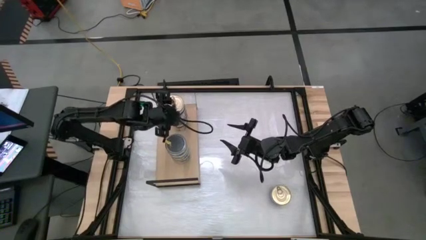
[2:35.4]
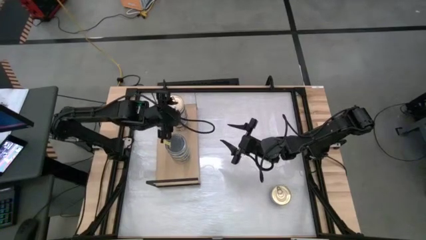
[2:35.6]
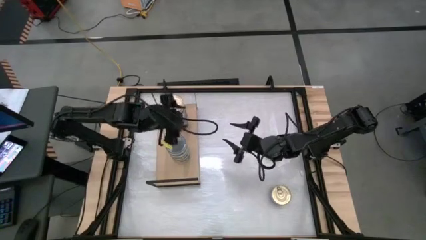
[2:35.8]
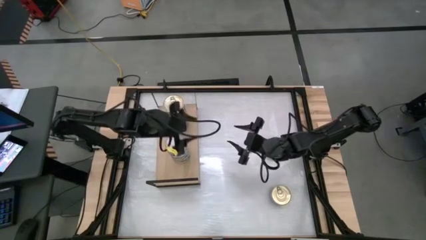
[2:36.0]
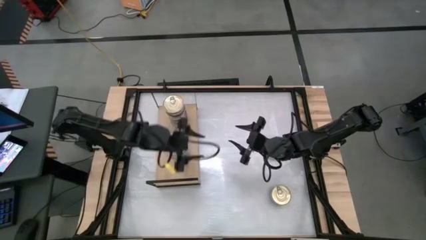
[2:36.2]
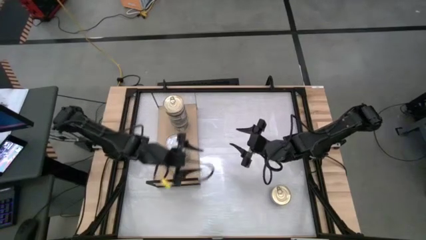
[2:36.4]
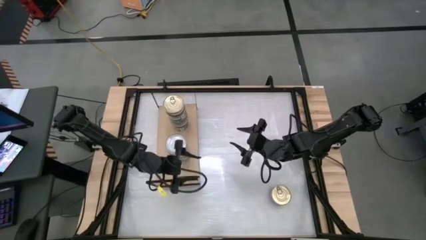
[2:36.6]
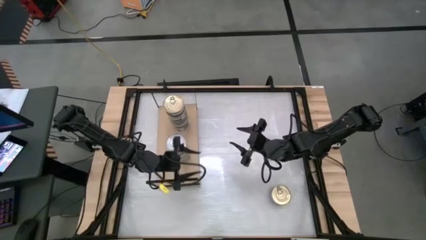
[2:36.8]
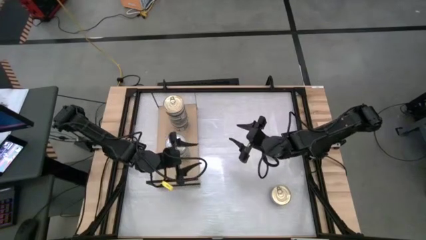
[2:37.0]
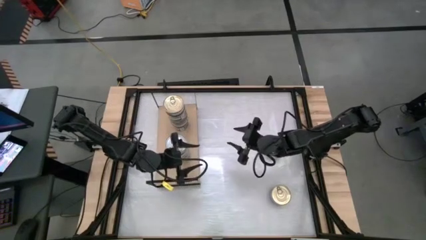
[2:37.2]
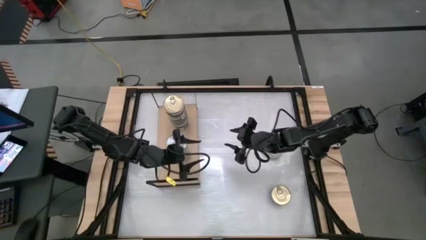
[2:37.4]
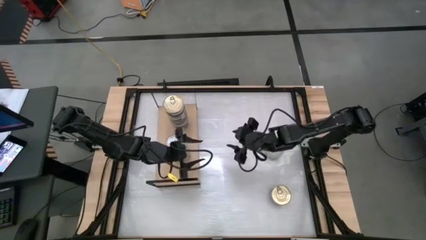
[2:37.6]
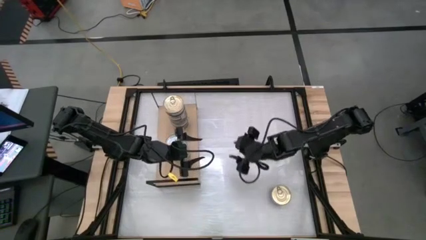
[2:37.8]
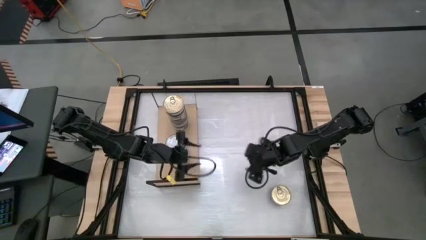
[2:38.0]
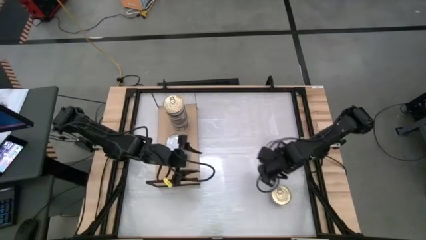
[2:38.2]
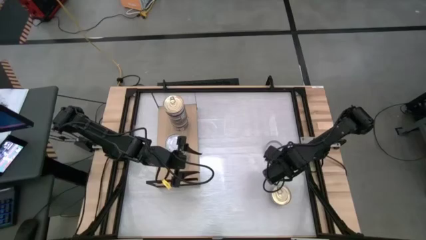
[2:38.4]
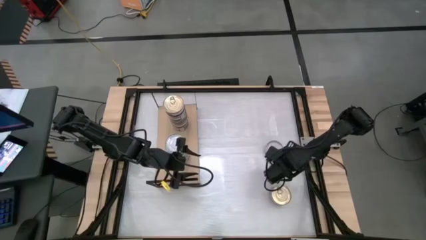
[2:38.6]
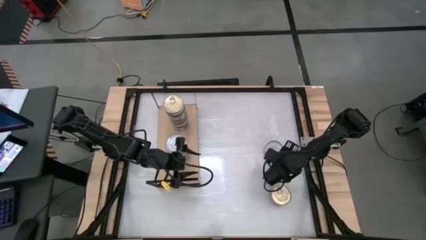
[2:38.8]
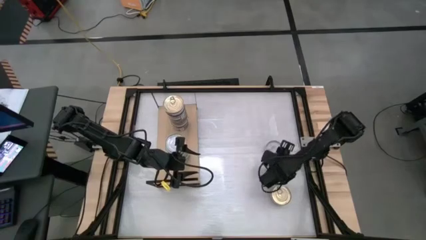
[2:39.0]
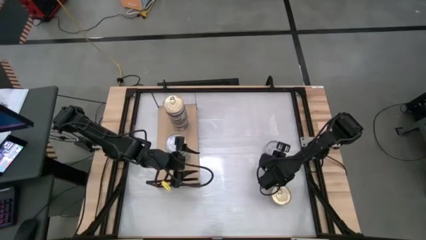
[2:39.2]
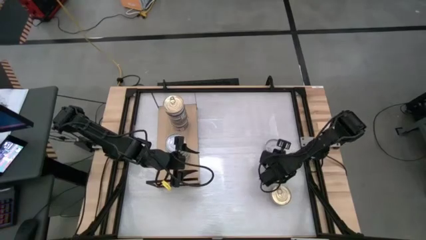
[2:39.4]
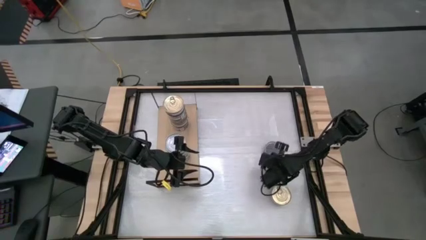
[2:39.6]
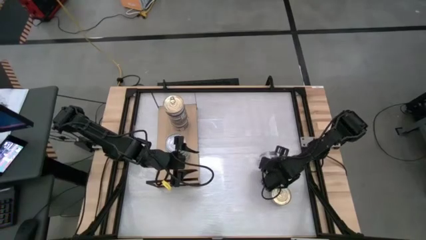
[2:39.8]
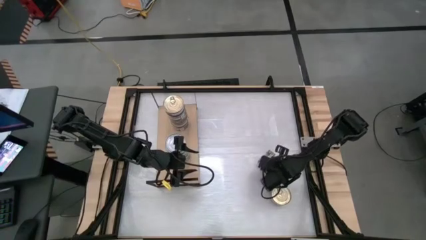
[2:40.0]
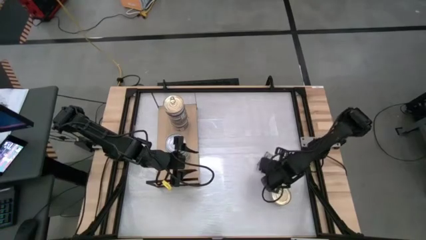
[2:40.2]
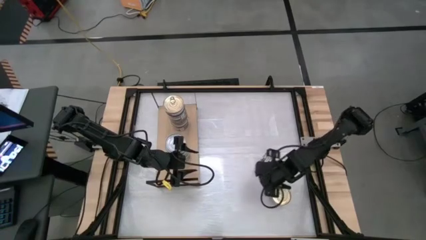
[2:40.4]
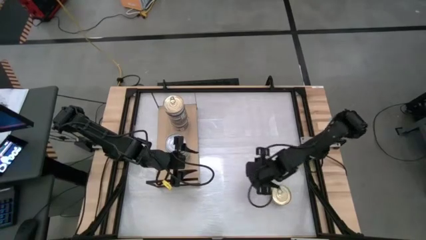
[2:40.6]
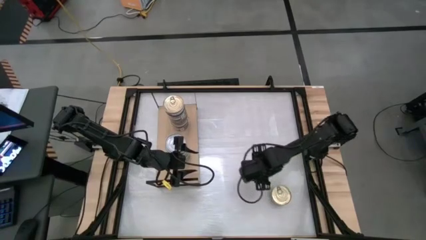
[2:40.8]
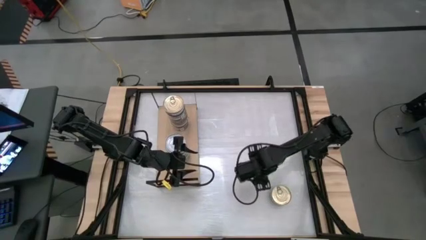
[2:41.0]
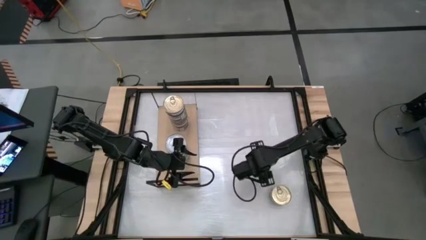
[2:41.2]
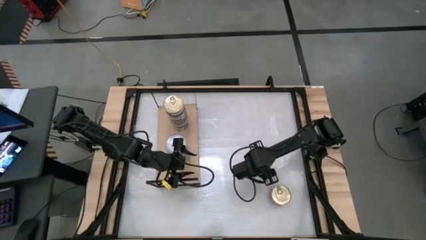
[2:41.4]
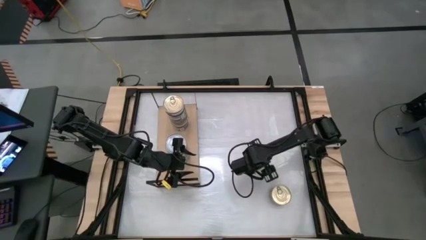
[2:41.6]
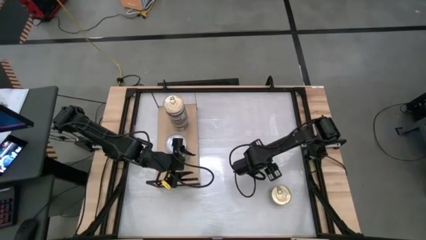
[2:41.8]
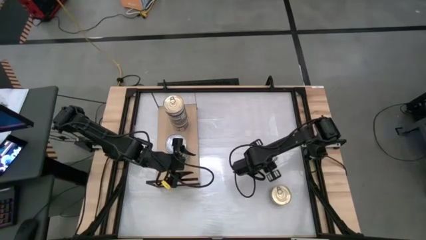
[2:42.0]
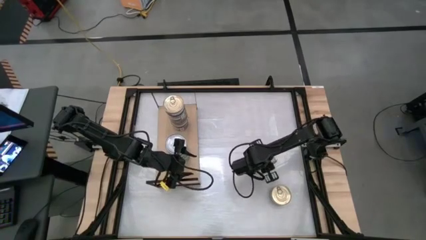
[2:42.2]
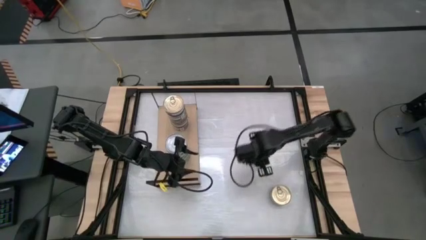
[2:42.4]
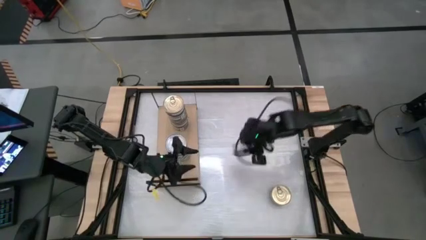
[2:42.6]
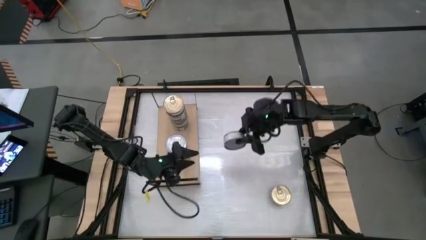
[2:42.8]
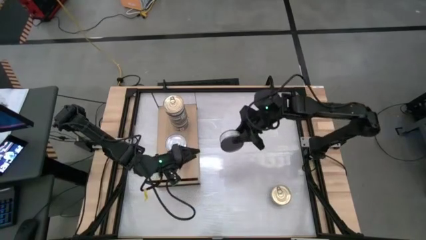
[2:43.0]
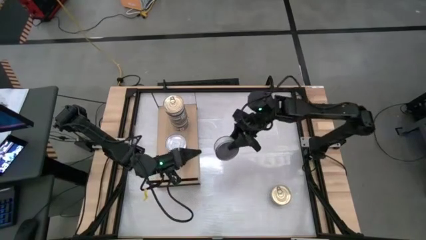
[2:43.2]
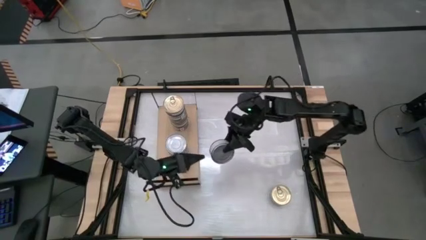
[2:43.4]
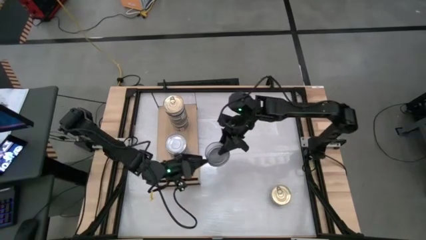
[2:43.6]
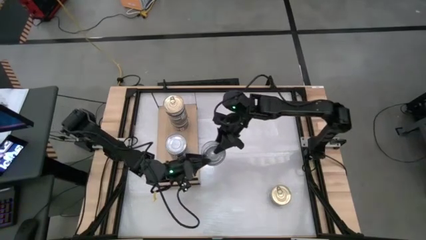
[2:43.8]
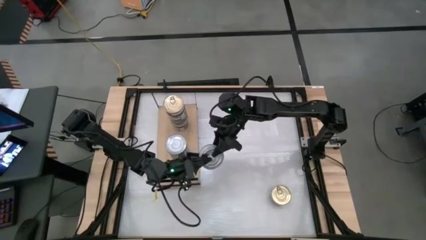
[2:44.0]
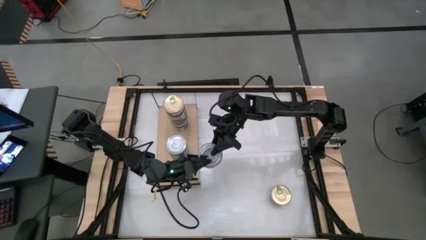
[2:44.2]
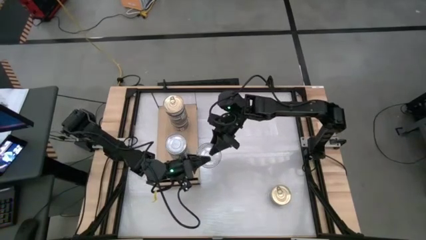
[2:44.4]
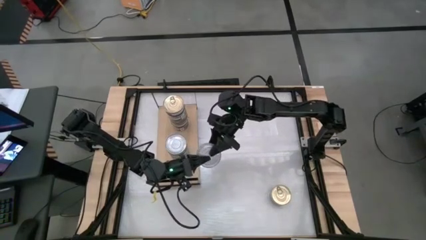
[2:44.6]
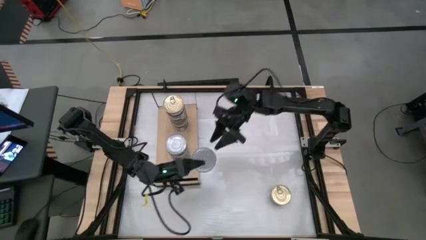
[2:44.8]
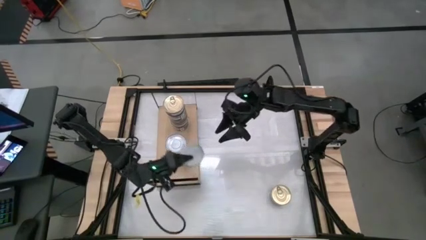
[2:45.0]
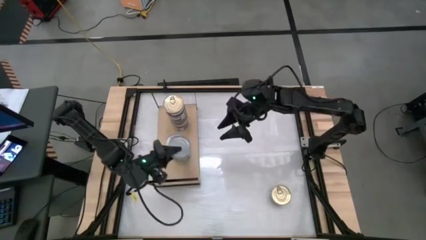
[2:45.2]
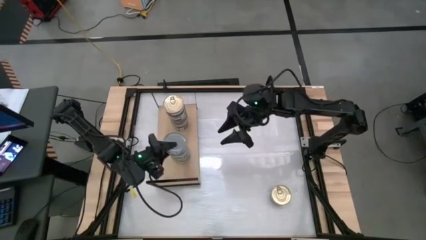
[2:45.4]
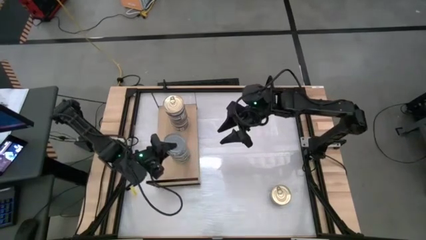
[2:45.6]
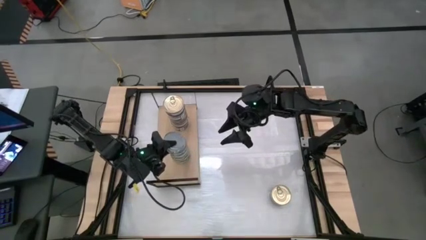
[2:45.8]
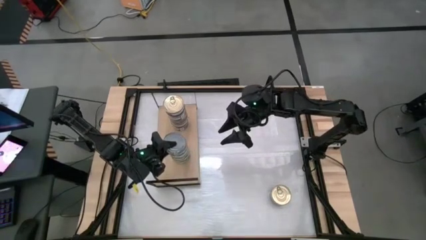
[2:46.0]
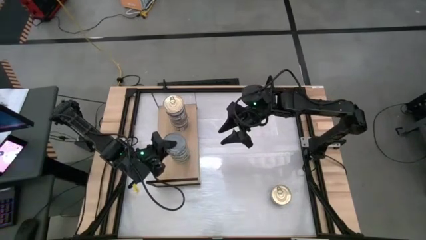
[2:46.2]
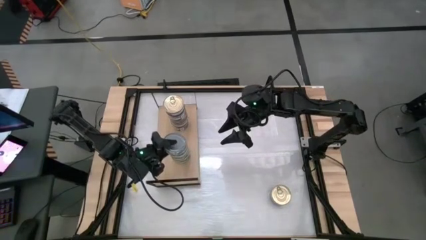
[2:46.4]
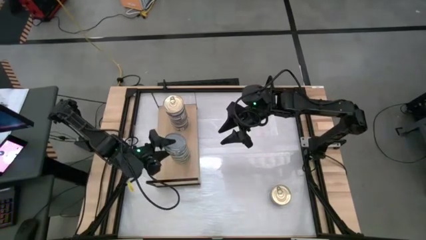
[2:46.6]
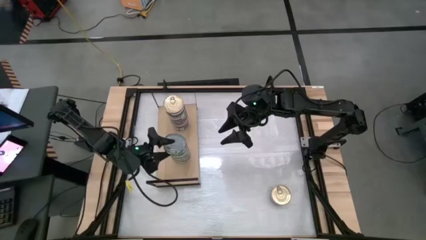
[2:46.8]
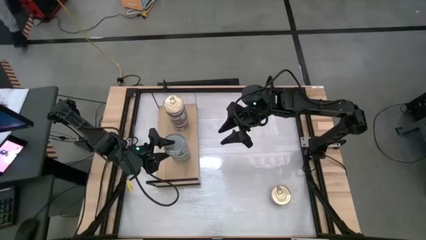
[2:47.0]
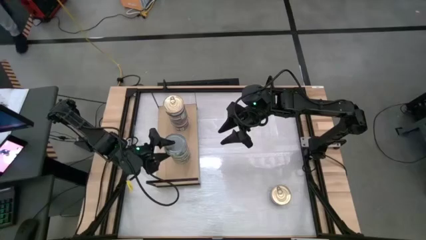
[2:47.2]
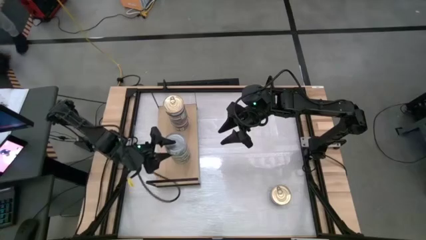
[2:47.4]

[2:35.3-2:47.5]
Task: Stack canned seafood by type on shelf
Stack the green tuna can on top of the other green tuna can on the shelf

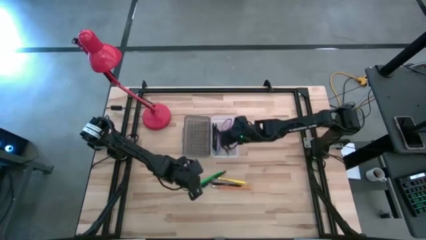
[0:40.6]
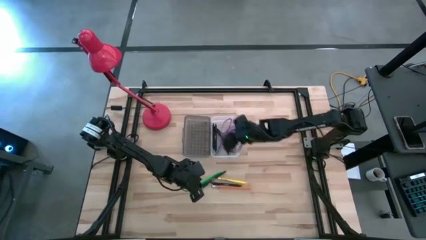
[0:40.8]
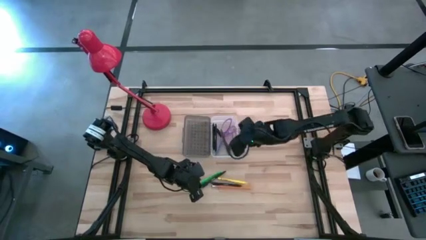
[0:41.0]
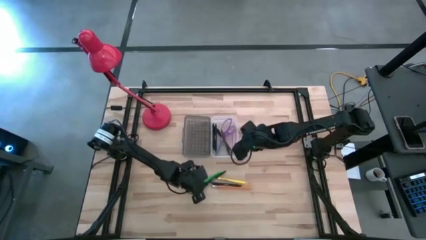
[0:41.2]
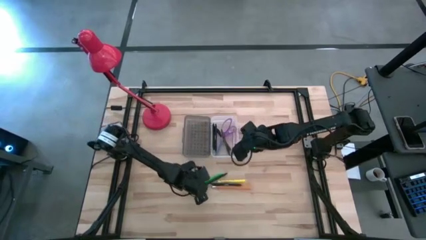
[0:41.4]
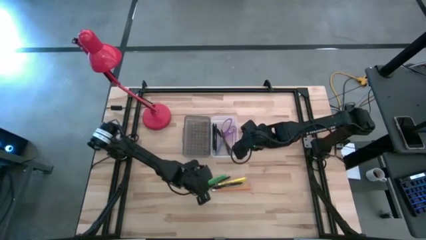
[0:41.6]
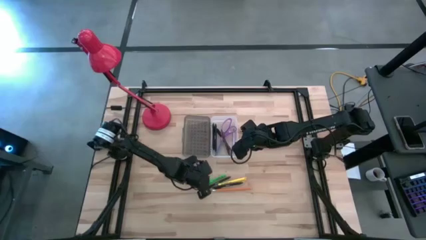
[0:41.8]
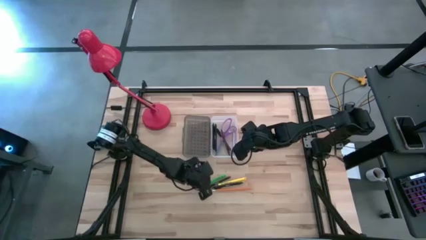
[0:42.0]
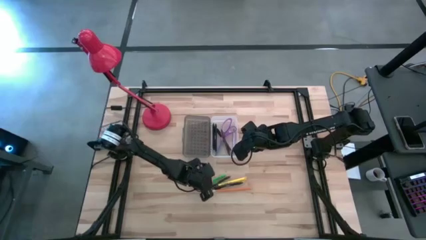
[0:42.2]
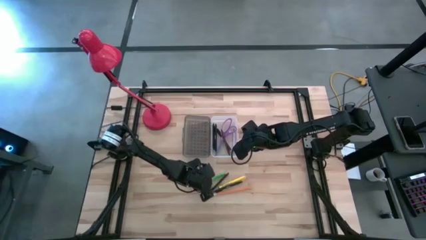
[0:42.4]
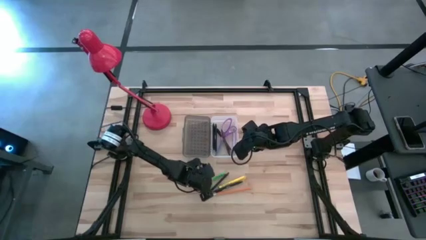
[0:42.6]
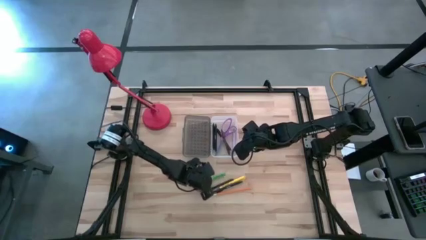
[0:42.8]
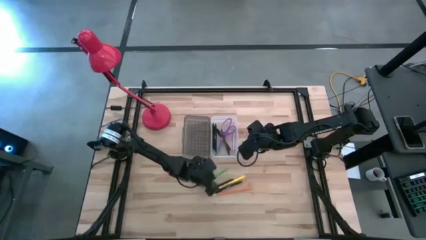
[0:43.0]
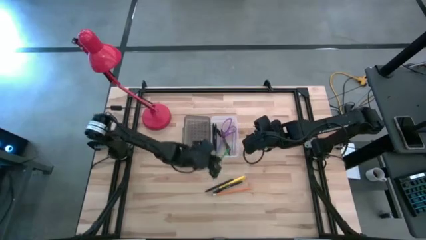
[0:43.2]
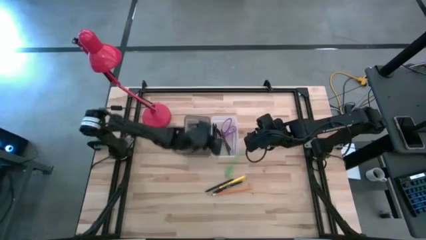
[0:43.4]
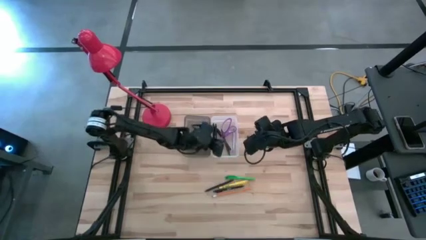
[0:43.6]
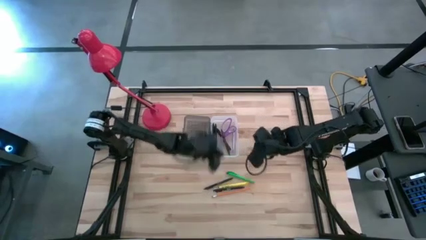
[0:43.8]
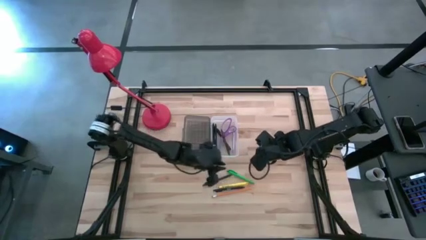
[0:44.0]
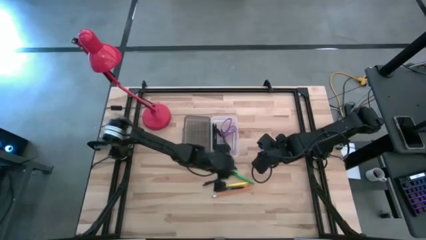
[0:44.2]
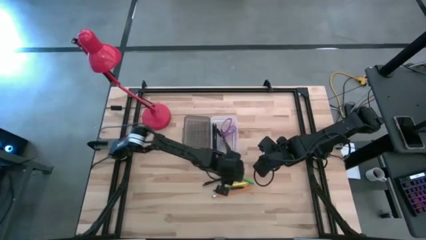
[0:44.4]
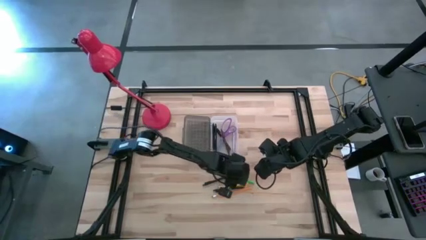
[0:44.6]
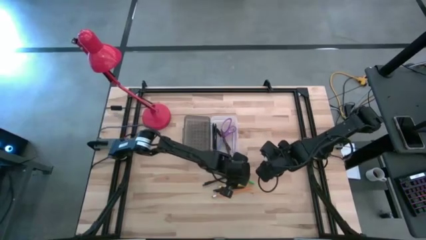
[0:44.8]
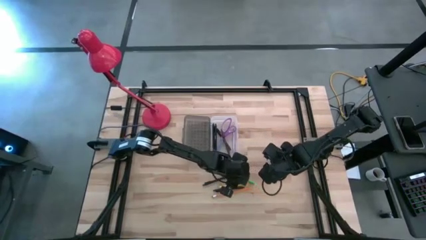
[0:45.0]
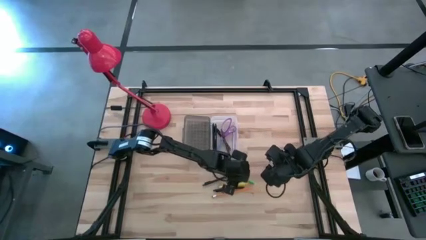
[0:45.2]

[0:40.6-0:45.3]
Task: Pick & place school supplies into a supply box
Put the green pen into the supply box

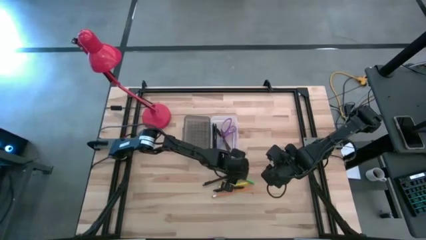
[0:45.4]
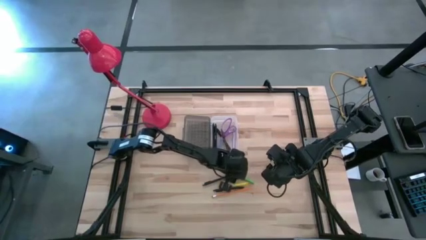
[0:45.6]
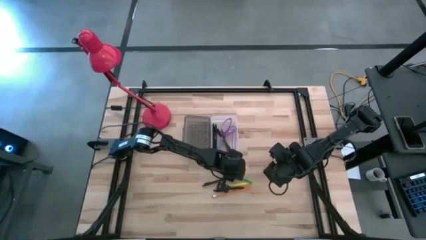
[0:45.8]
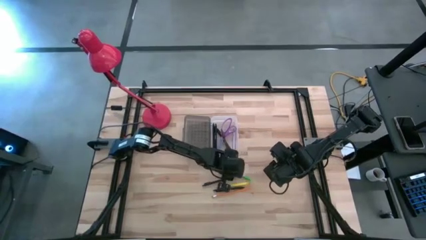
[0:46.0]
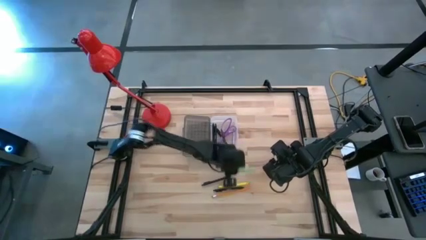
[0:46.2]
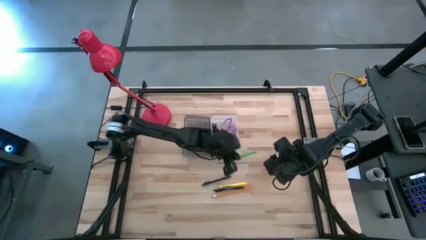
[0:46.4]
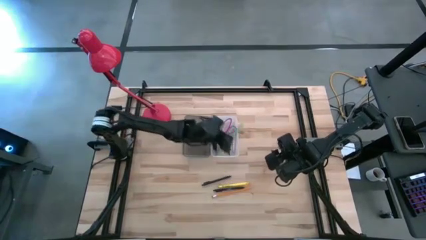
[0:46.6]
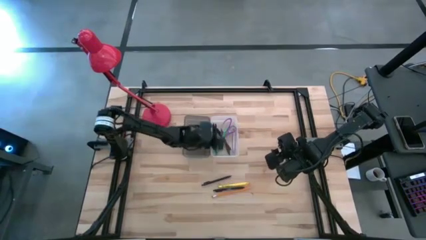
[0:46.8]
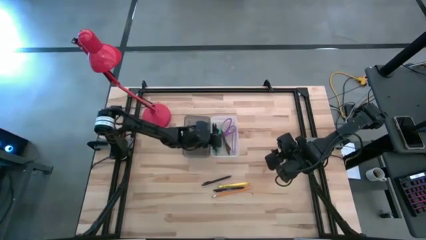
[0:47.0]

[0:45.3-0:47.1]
Put the green pen into the supply box
